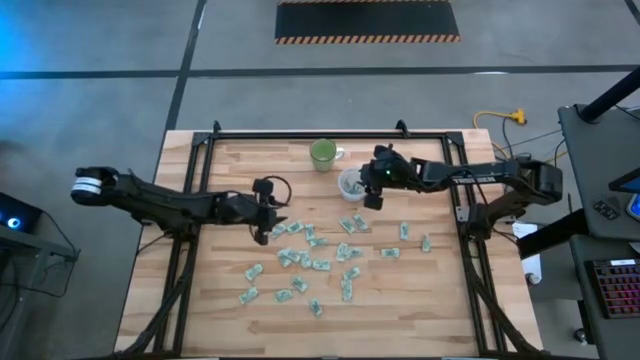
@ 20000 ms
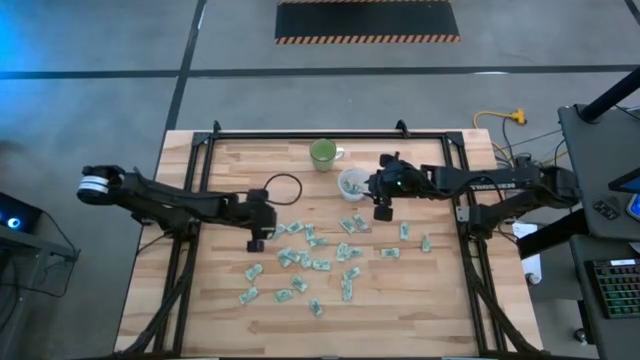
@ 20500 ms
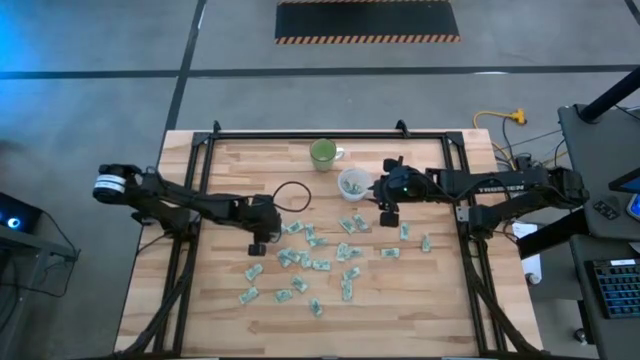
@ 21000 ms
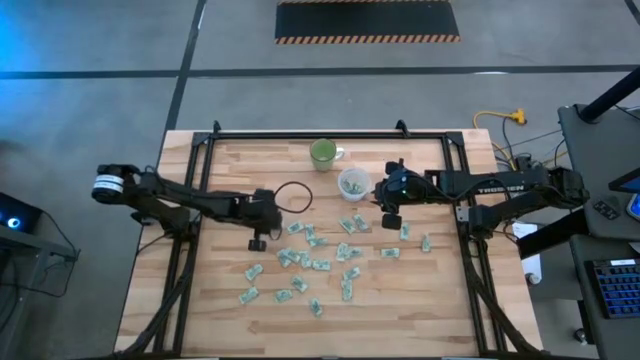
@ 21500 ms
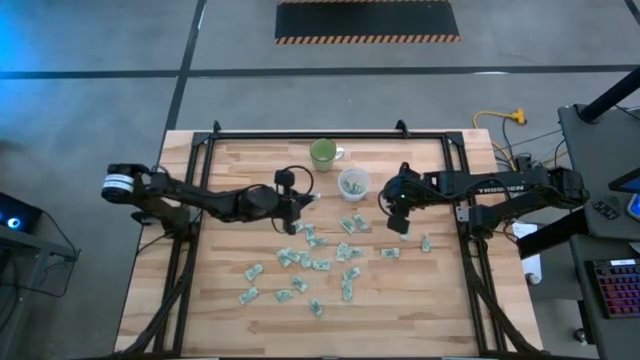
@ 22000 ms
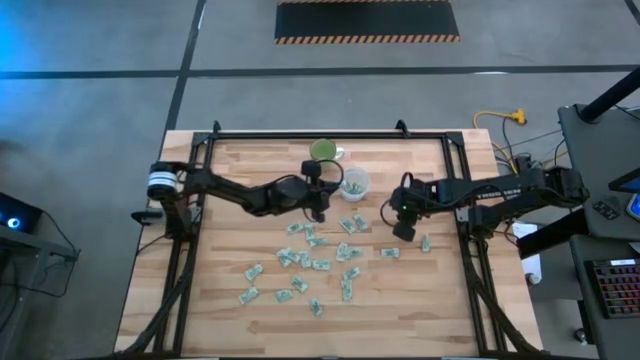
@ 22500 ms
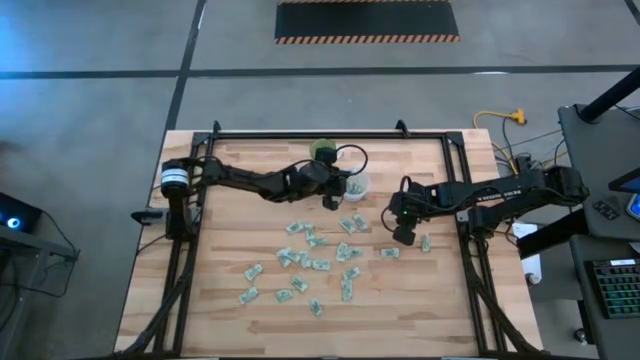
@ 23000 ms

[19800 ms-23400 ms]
Task: Pick and place Stevia / Truvia into bins
Put the stevia packet into the transparent container

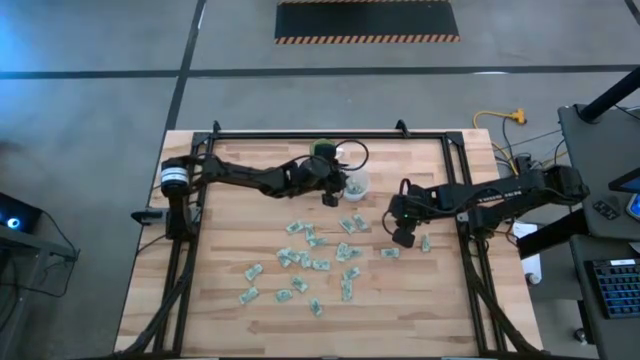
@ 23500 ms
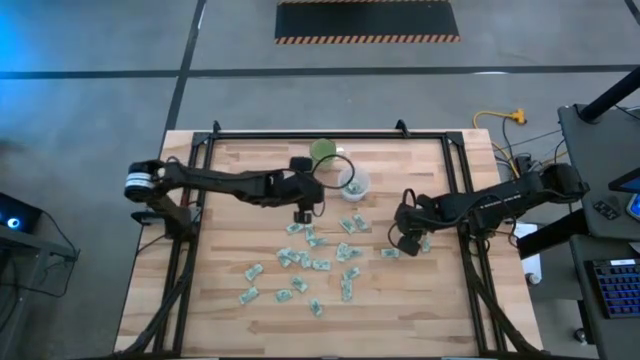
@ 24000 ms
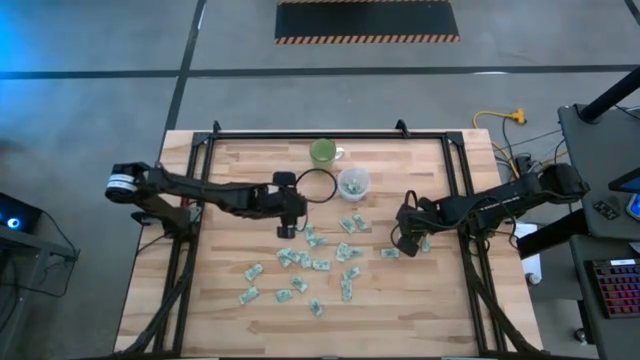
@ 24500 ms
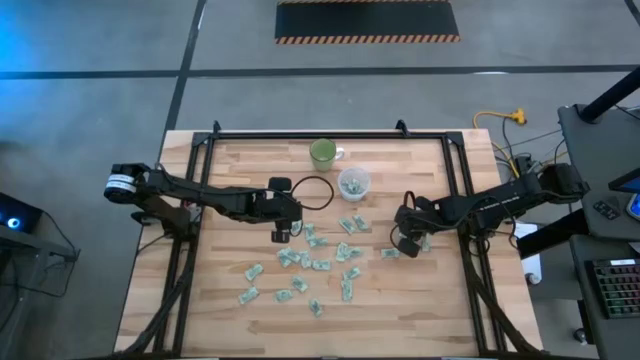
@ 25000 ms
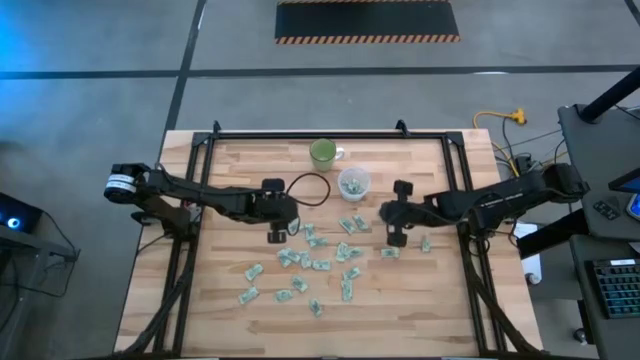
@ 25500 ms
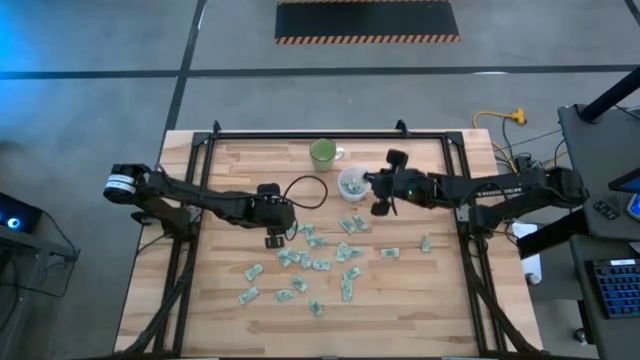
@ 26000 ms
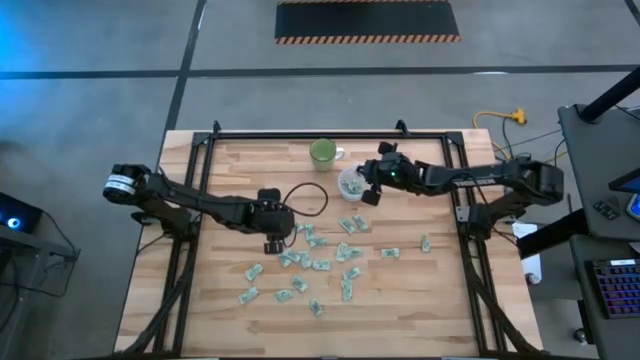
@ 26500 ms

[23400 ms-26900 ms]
Put the stevia packet into the transparent container

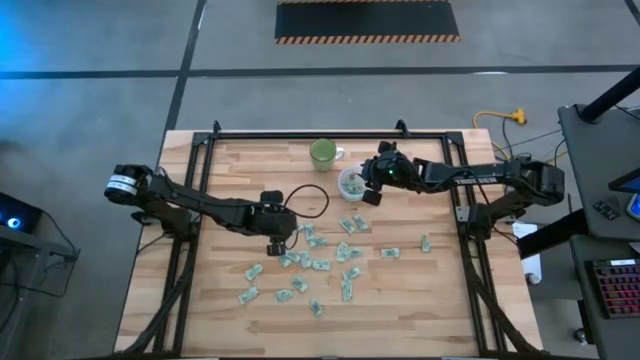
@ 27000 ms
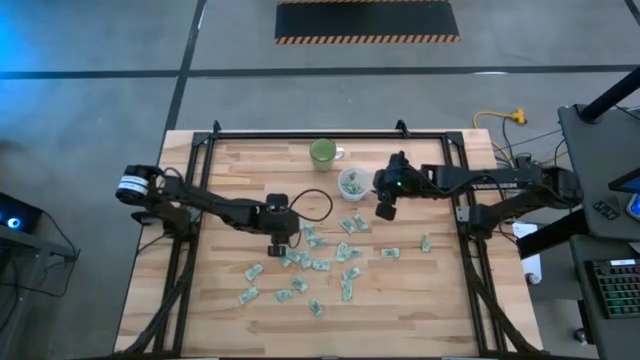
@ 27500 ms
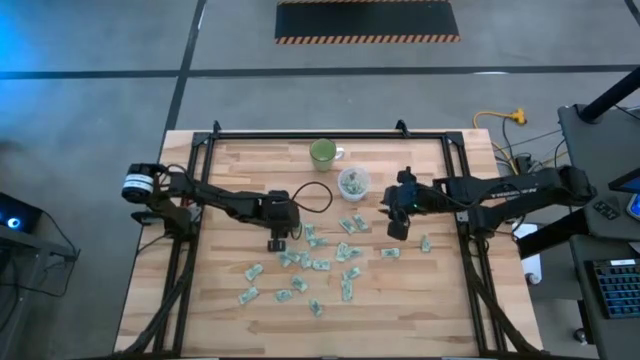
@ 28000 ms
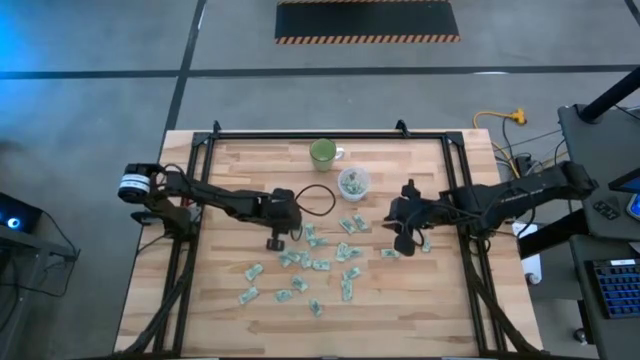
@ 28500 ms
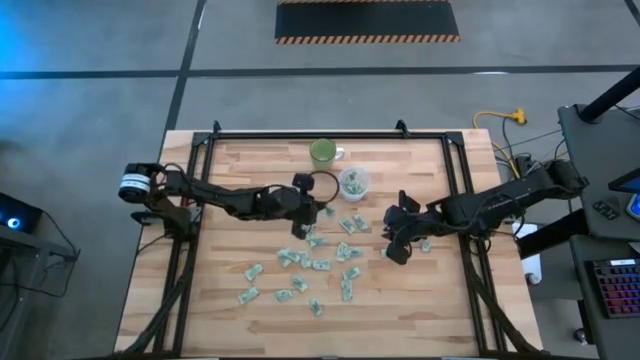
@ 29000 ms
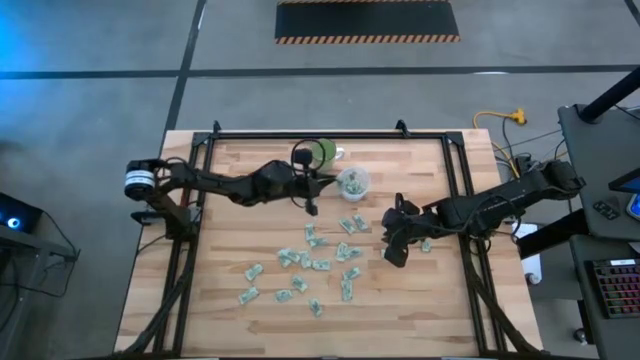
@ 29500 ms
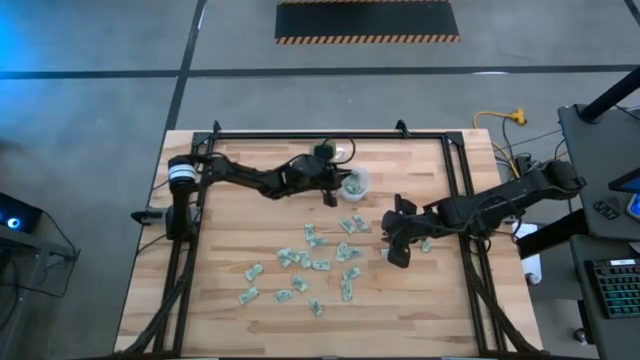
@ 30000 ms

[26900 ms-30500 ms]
Put the stevia packet into the transparent container

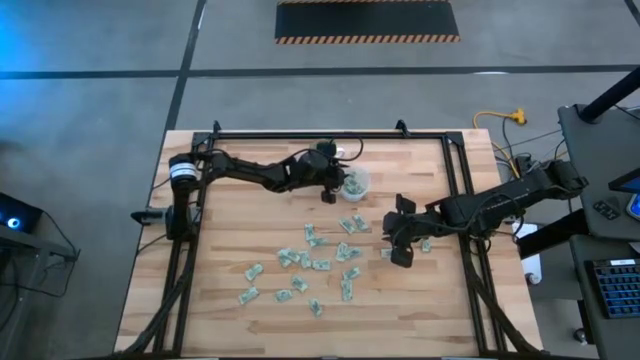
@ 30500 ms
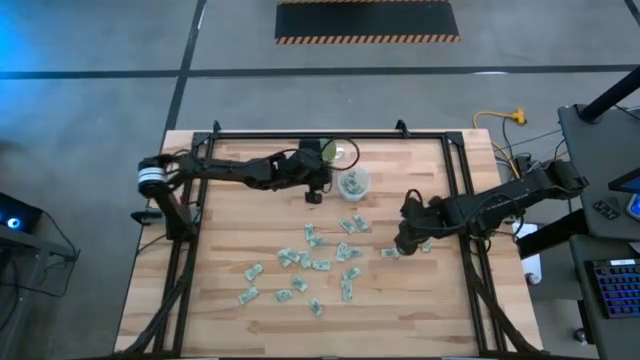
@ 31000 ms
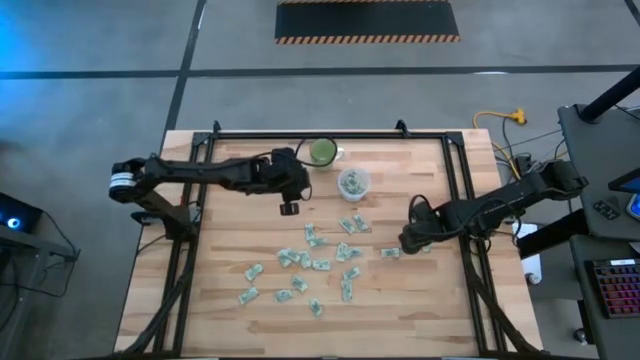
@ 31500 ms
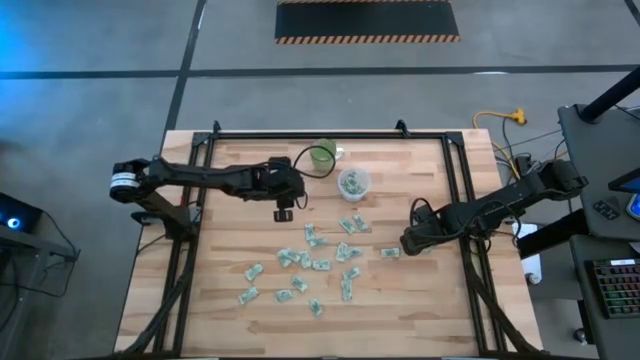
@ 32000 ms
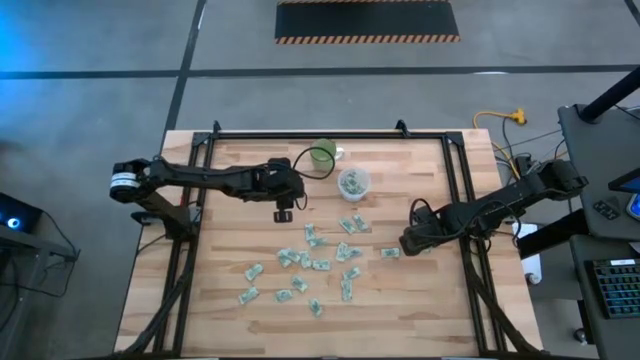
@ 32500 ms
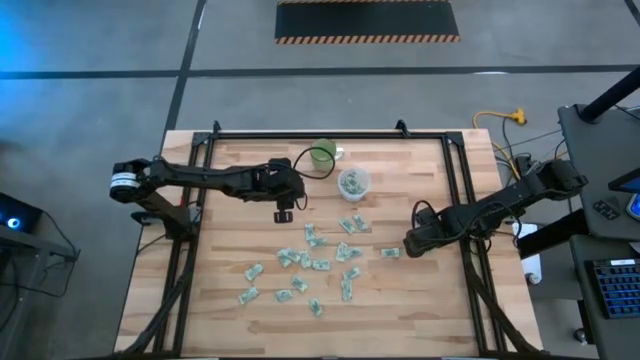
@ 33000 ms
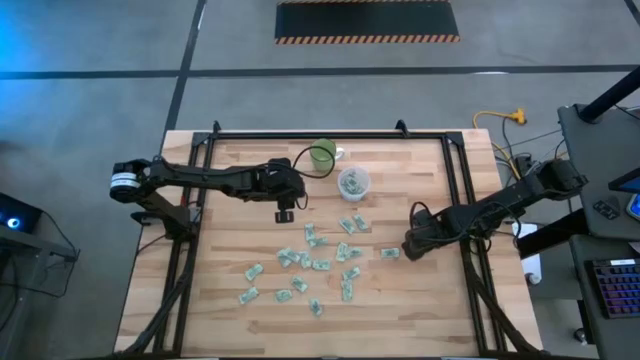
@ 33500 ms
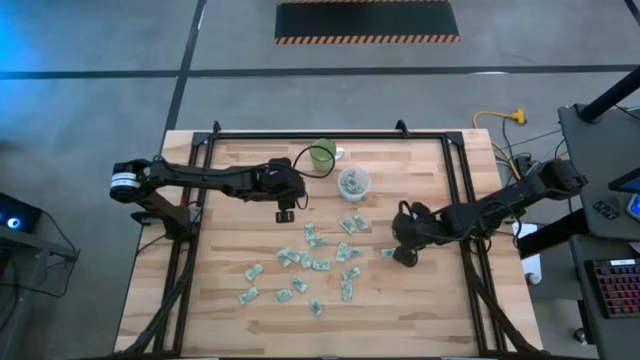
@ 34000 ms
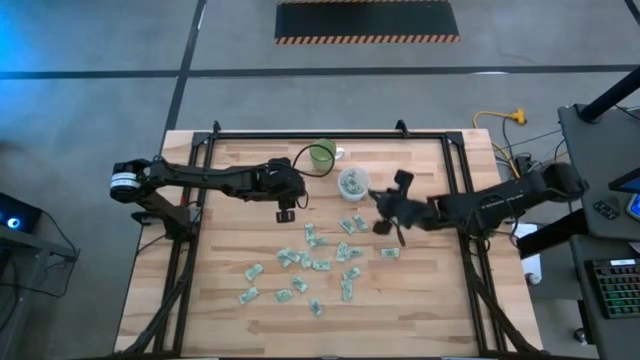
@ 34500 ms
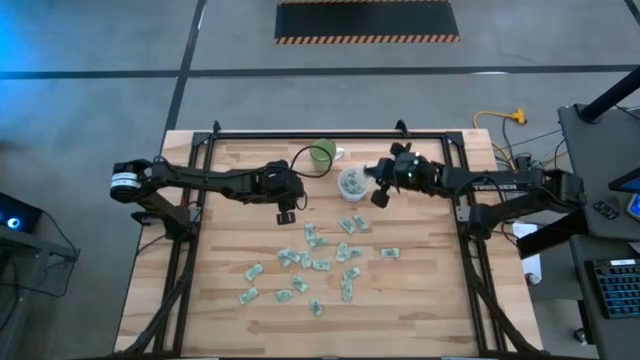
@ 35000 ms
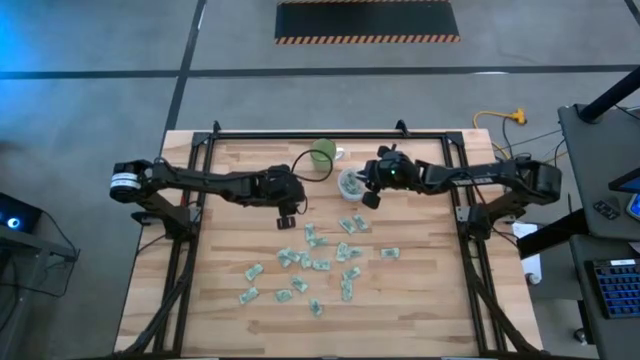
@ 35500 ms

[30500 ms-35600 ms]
Put the stevia packet into the transparent container

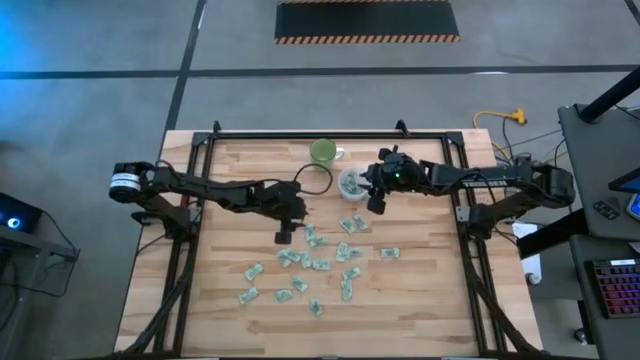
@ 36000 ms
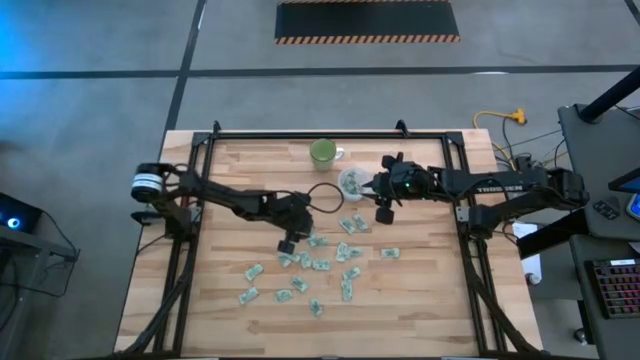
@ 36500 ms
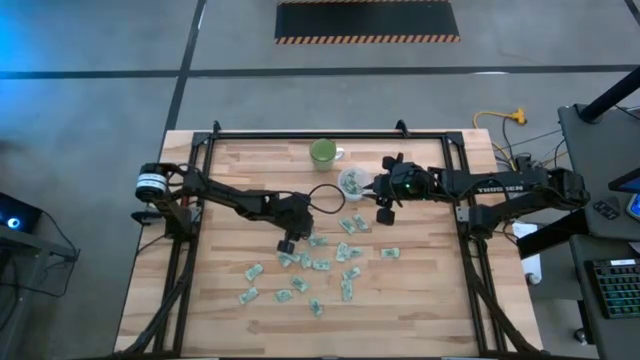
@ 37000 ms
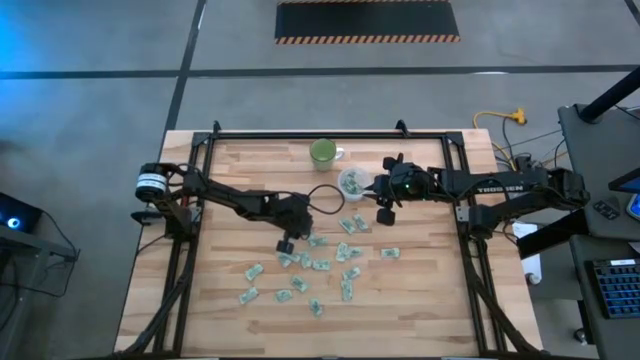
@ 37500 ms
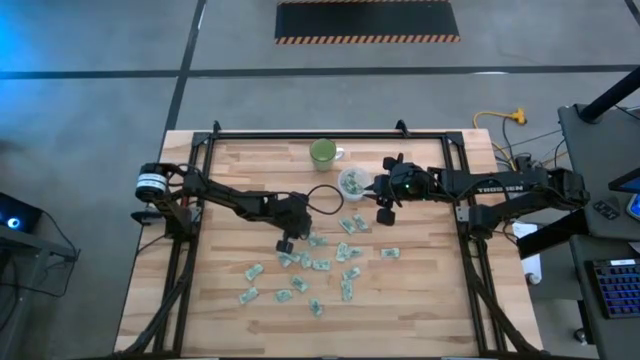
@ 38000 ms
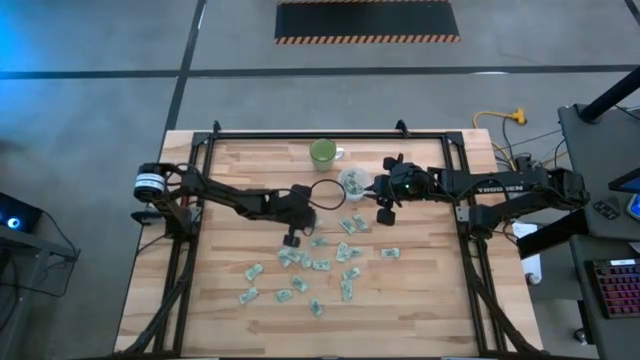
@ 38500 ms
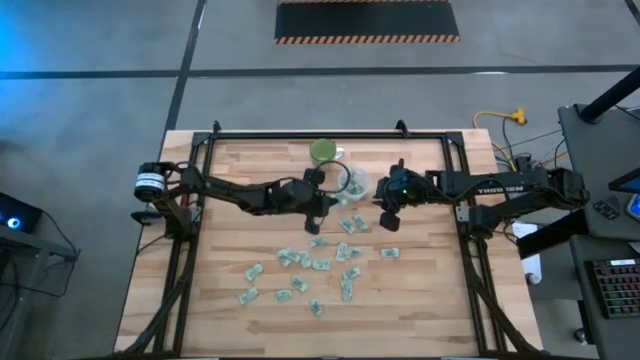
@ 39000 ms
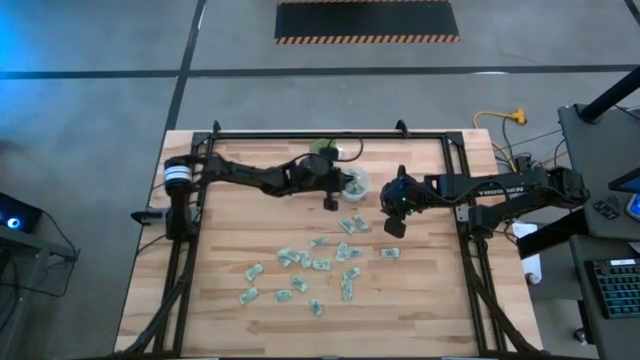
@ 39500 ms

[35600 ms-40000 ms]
Put the stevia packet into the transparent container
